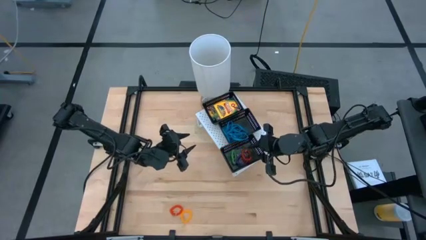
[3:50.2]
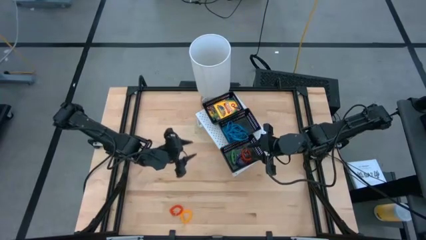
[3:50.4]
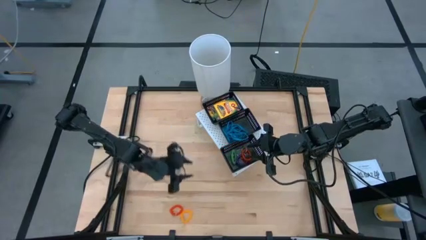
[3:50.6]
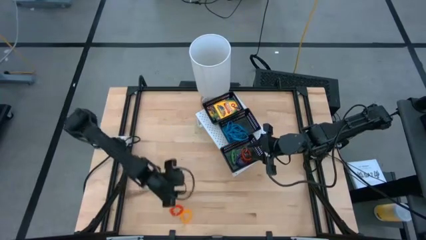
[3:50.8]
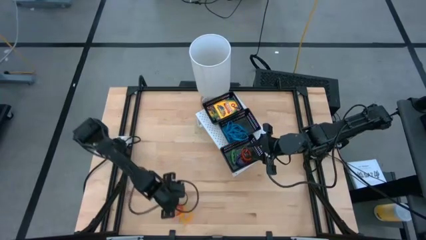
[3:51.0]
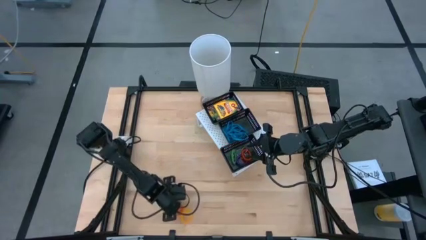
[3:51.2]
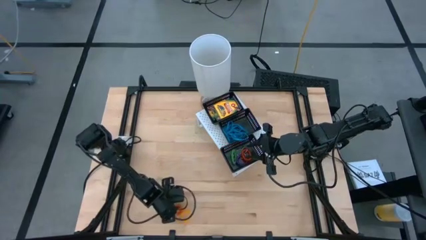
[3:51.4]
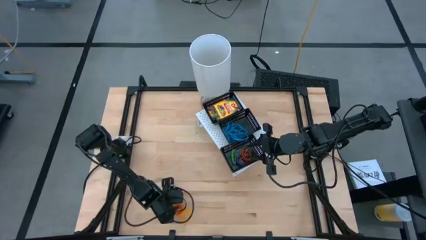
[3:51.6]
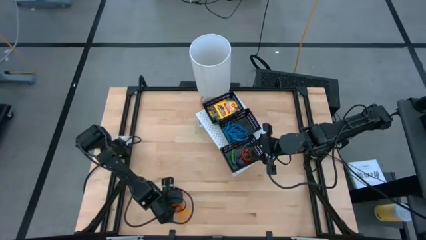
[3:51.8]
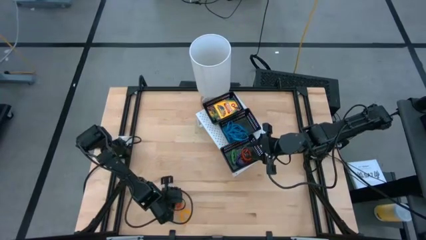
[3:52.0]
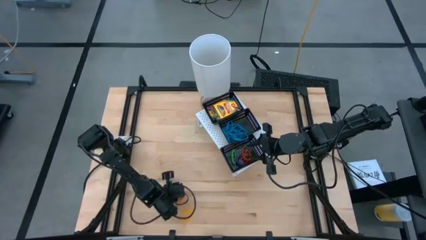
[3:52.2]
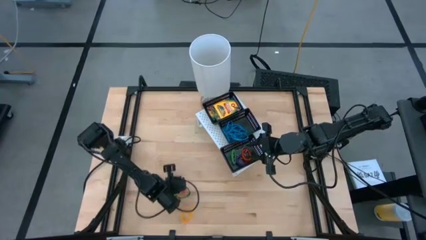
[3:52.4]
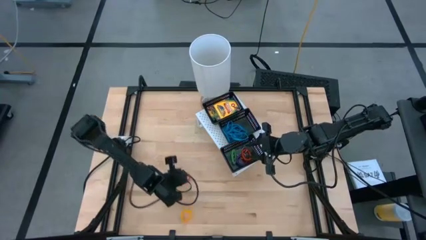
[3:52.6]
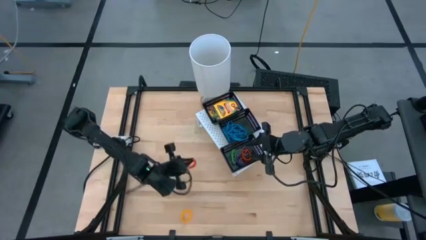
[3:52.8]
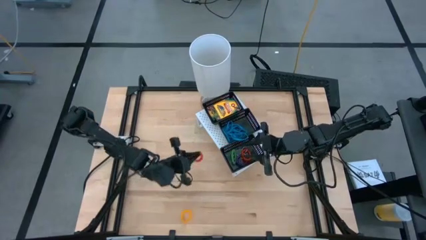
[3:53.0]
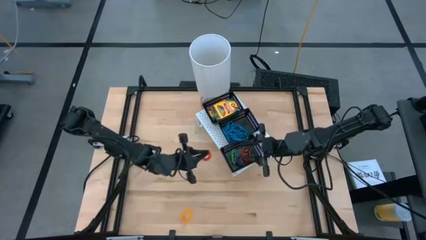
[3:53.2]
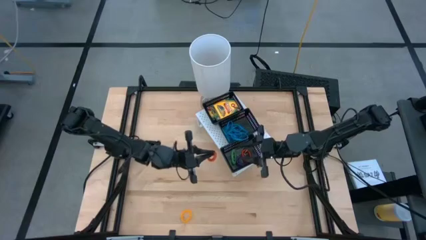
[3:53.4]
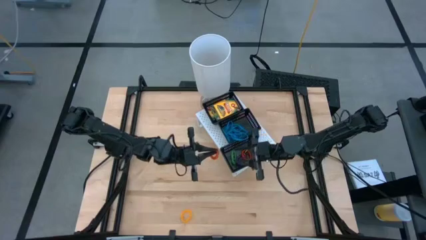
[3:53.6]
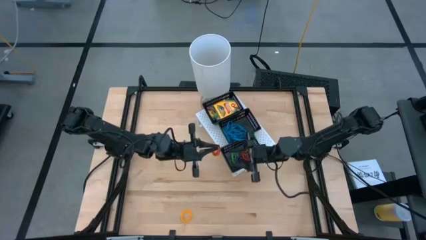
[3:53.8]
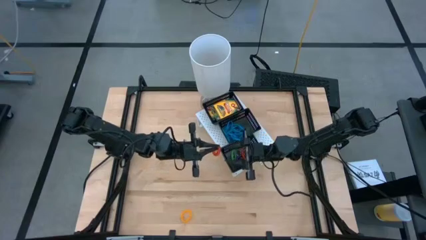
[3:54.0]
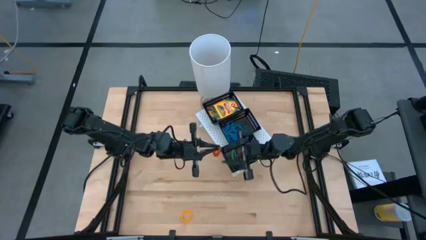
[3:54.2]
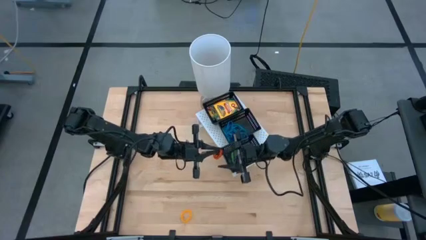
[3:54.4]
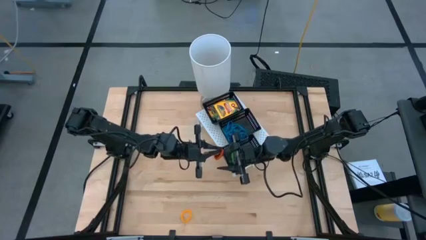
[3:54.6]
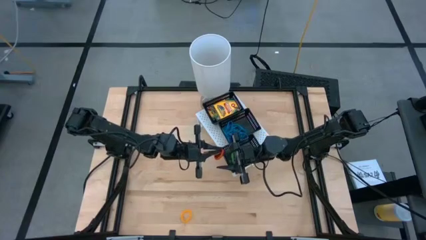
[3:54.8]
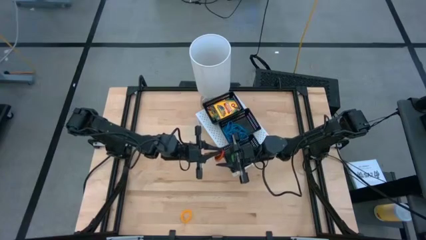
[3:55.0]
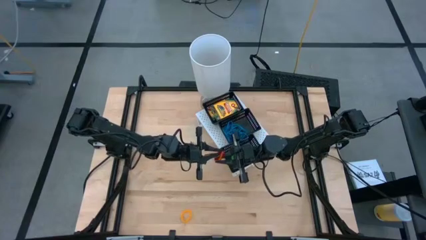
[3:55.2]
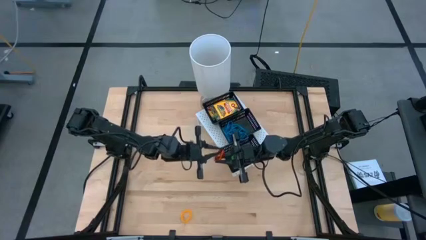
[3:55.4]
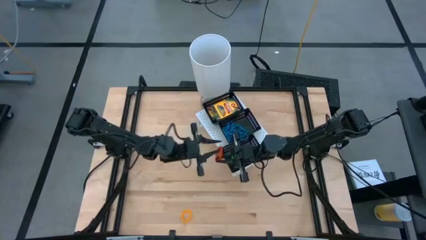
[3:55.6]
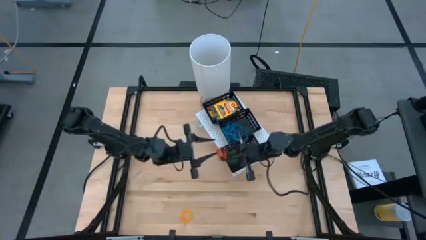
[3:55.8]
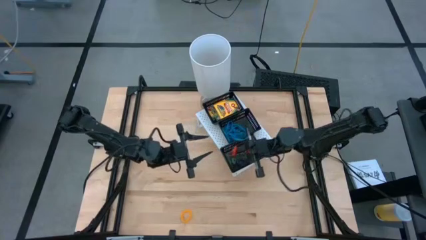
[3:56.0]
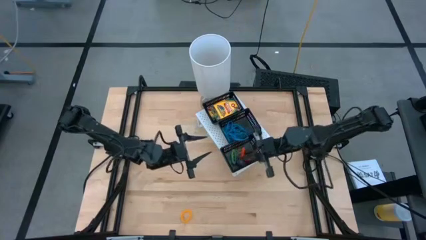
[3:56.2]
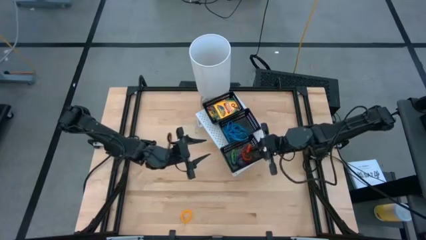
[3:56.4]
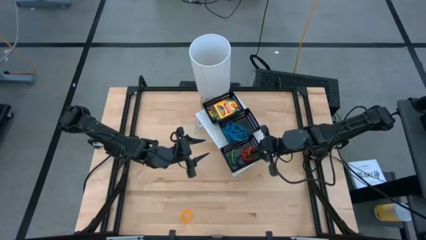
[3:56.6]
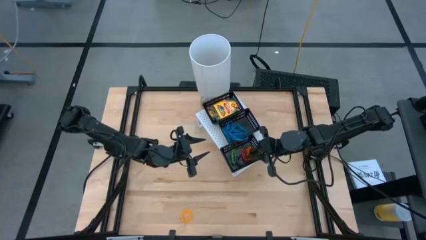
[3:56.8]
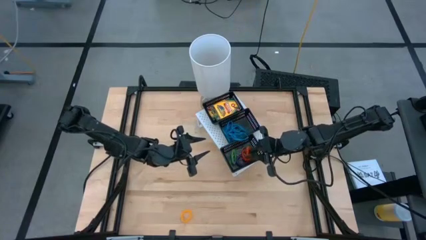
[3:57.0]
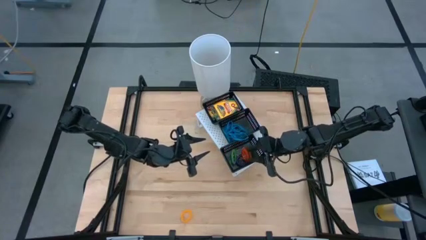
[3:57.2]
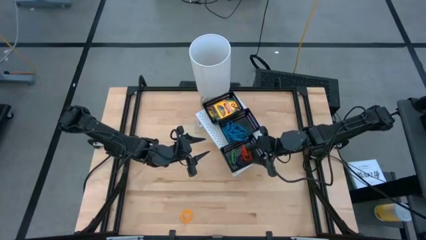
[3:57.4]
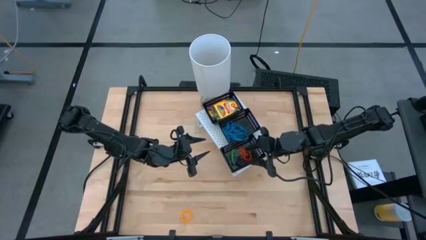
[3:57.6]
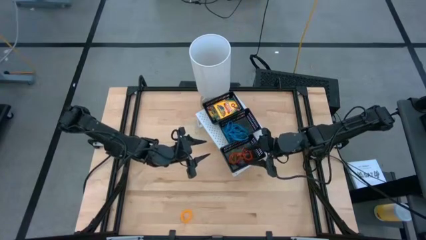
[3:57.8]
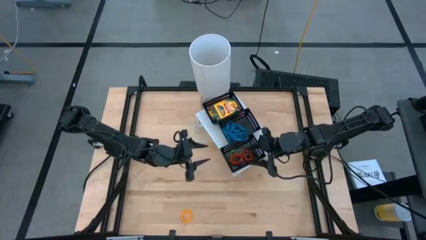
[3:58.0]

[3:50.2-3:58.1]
Task: Pick & Place Office Desk Supplies
Put the orange spring rubberband into the bottom black bin on the shelf

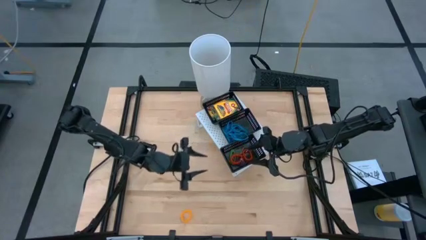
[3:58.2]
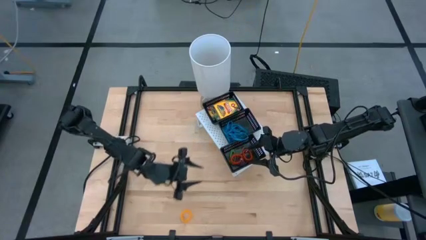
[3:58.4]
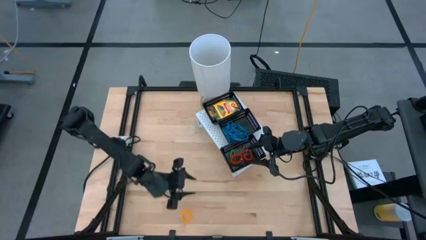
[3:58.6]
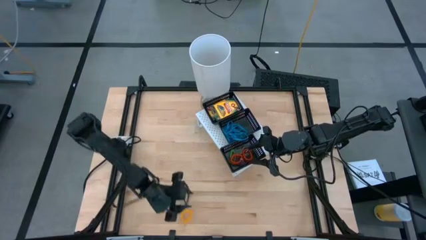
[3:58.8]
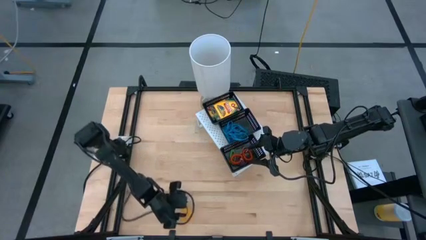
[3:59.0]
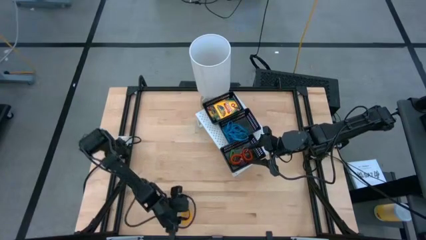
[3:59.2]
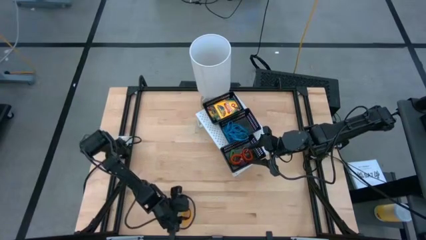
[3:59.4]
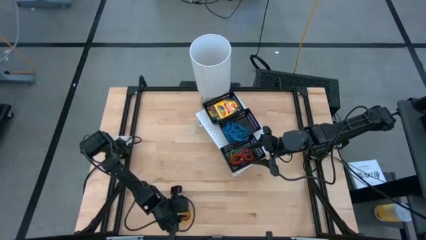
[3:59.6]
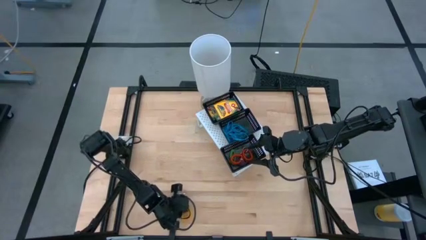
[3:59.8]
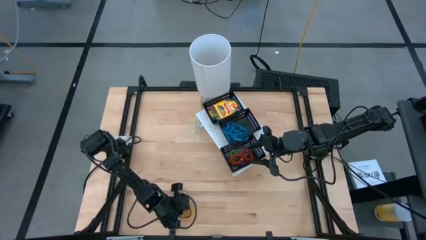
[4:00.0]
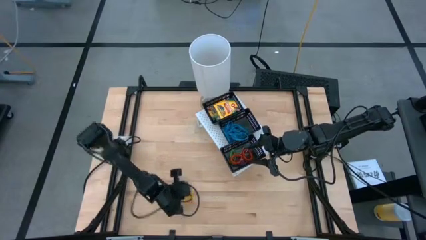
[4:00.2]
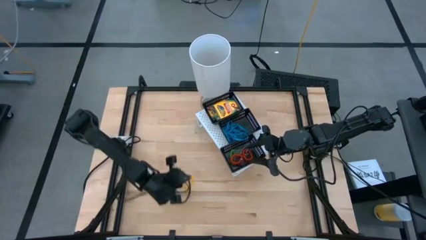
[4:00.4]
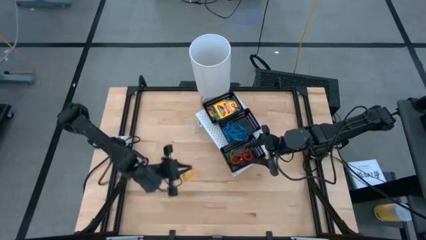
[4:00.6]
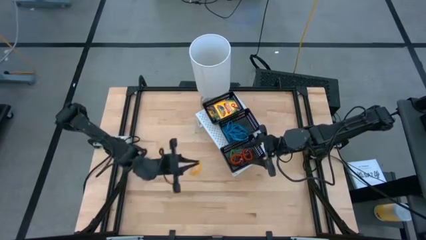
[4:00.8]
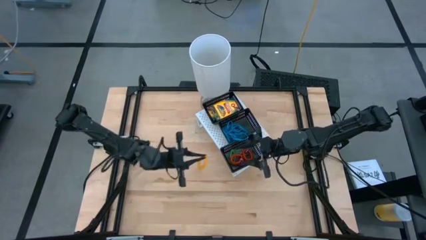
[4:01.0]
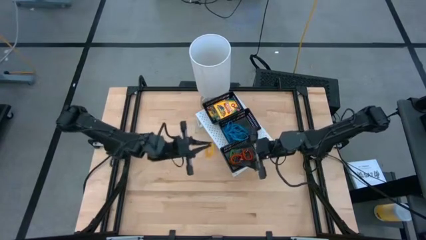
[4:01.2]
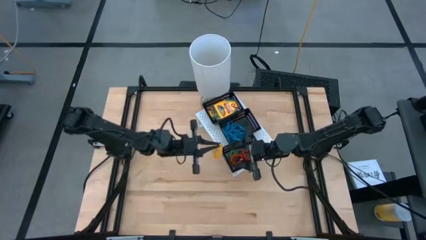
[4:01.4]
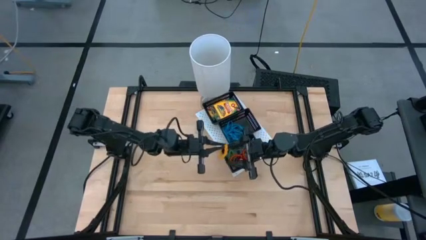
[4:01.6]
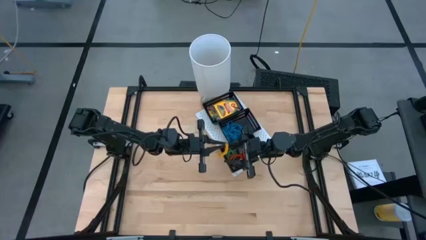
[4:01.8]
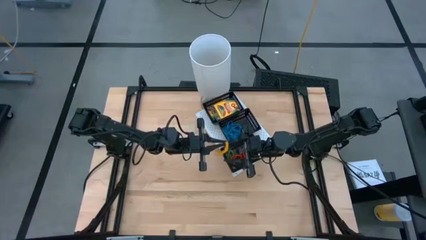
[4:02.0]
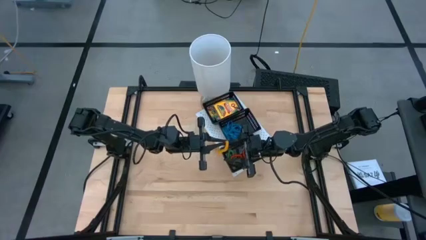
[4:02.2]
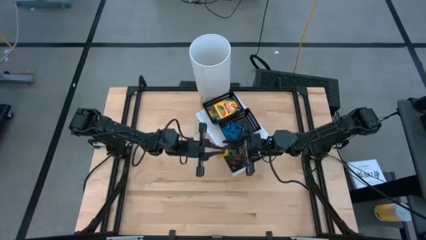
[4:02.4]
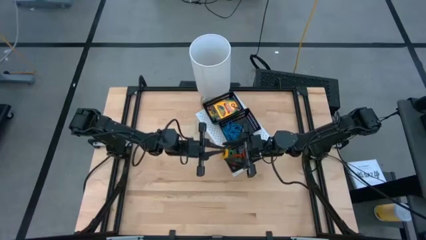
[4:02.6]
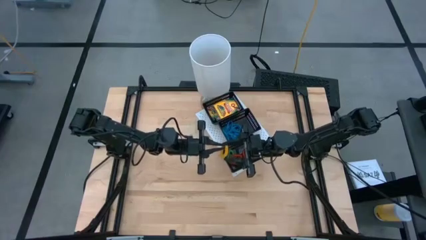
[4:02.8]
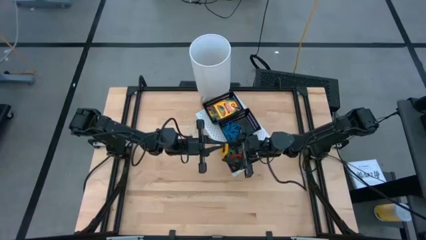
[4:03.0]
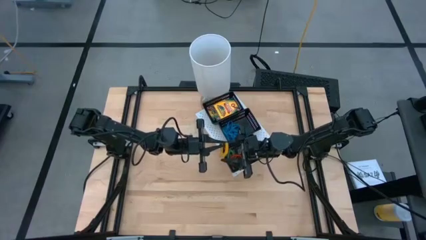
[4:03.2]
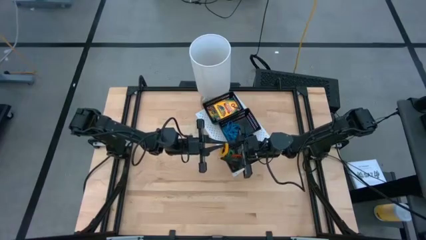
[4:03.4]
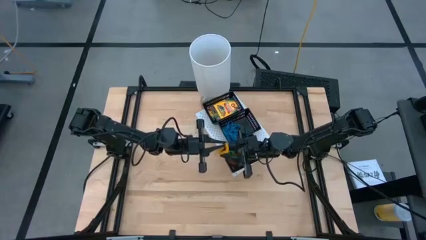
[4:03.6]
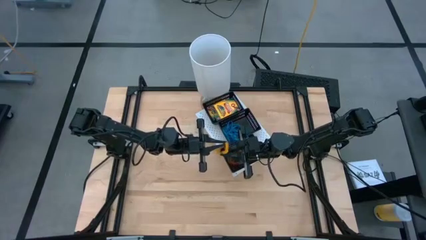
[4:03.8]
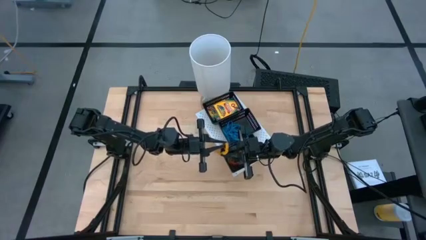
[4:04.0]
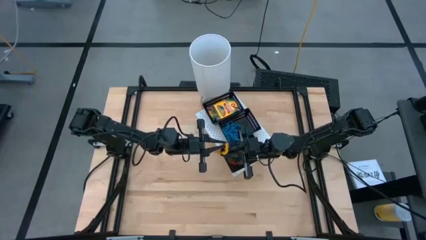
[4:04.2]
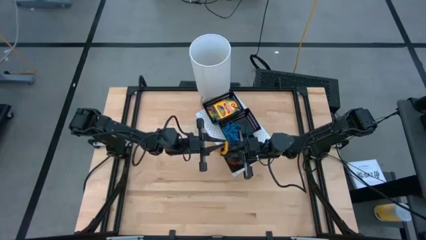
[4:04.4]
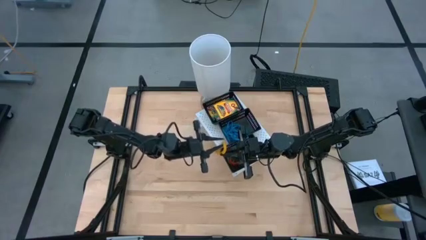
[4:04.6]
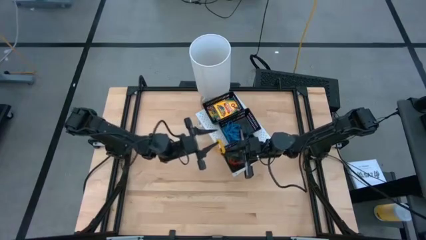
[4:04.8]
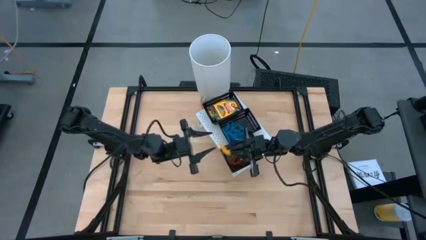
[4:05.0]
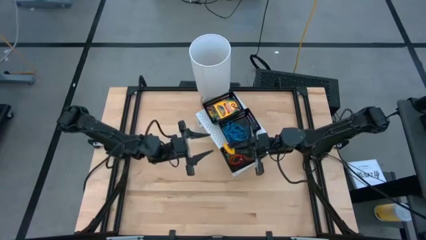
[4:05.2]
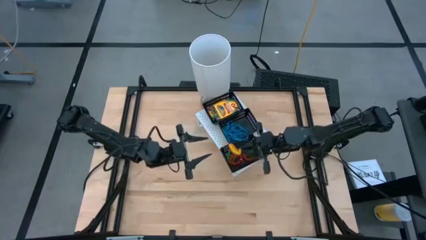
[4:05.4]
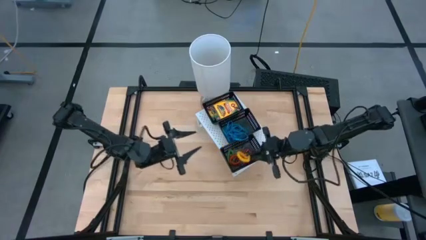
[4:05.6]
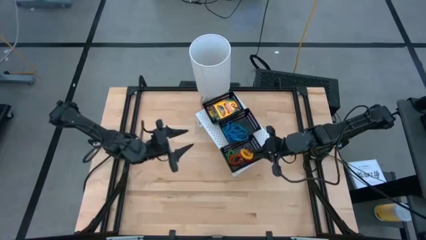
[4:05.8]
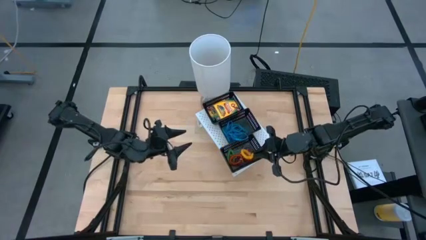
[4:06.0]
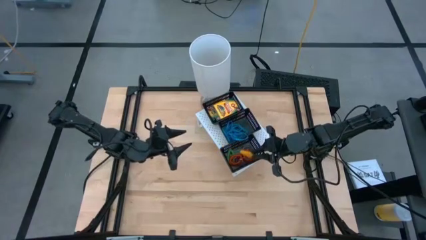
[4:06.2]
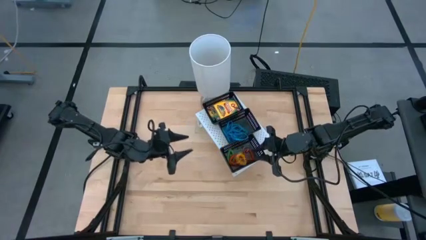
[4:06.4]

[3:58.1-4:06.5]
Put the yellow spring rubberband into the bottom black bin on the shelf
